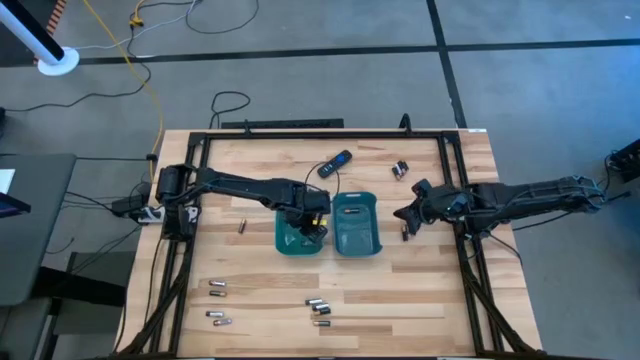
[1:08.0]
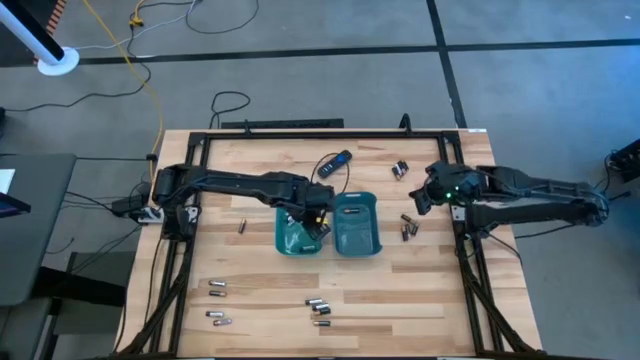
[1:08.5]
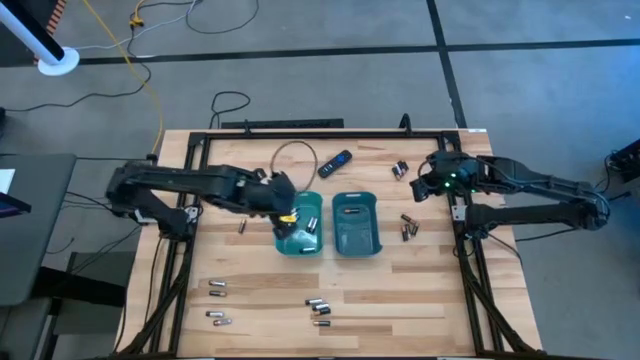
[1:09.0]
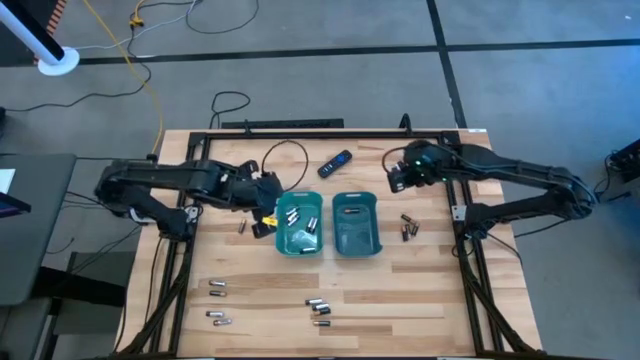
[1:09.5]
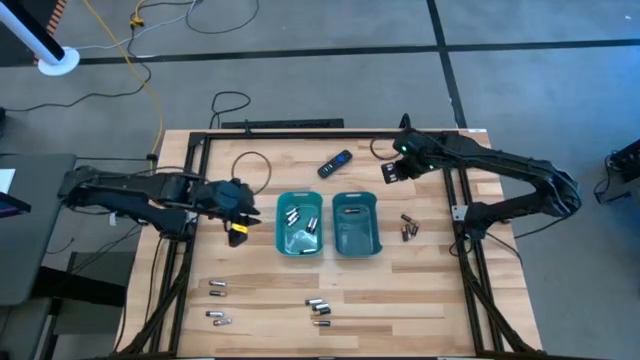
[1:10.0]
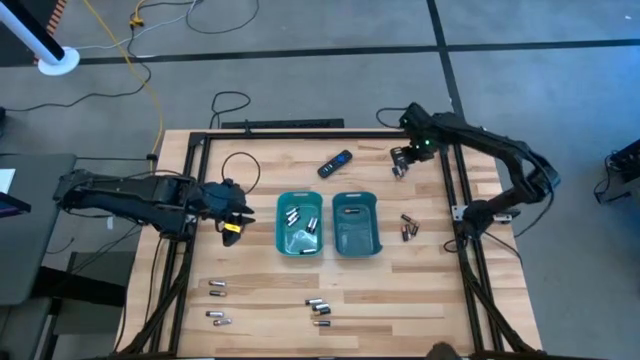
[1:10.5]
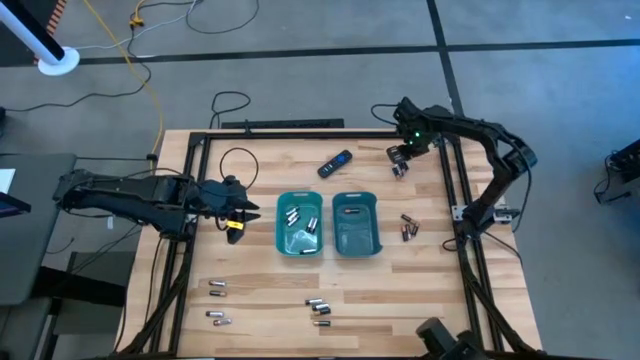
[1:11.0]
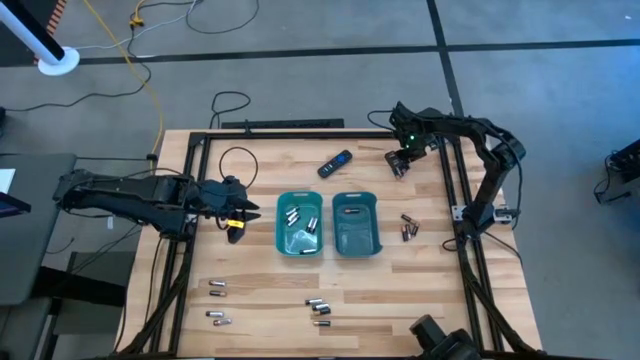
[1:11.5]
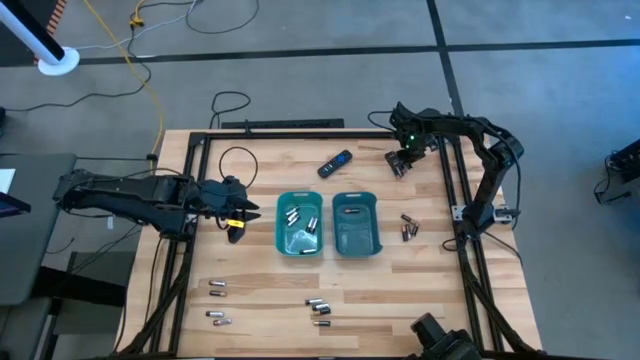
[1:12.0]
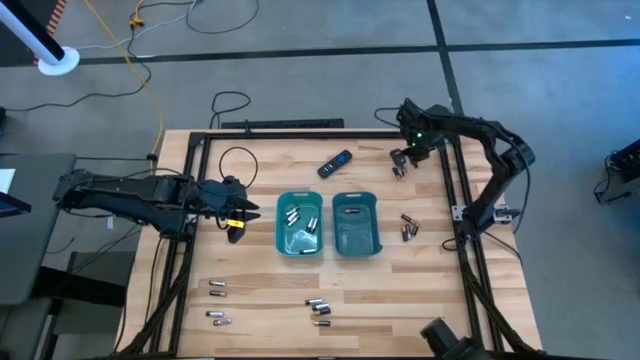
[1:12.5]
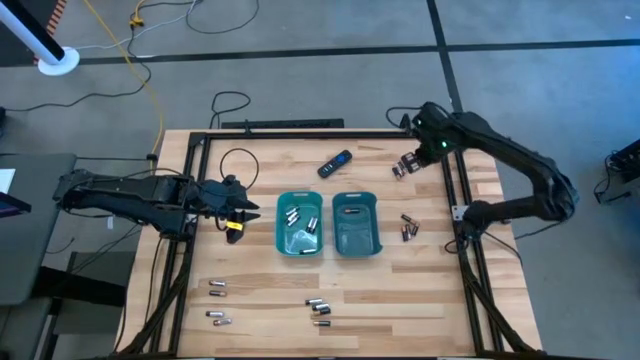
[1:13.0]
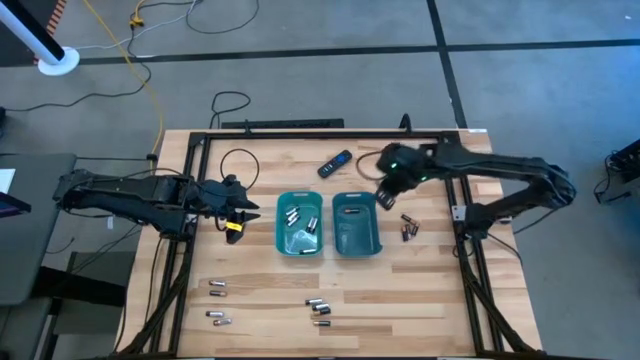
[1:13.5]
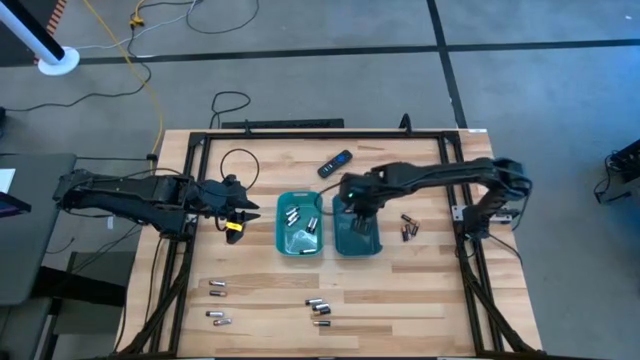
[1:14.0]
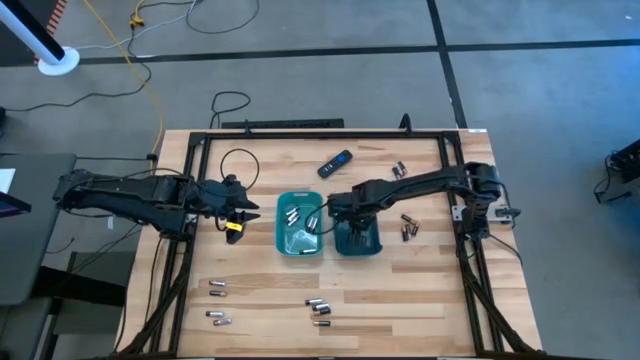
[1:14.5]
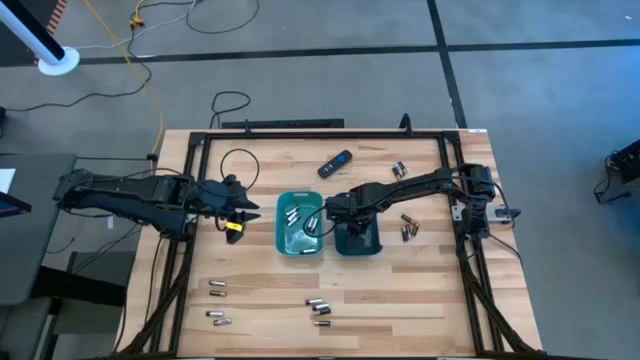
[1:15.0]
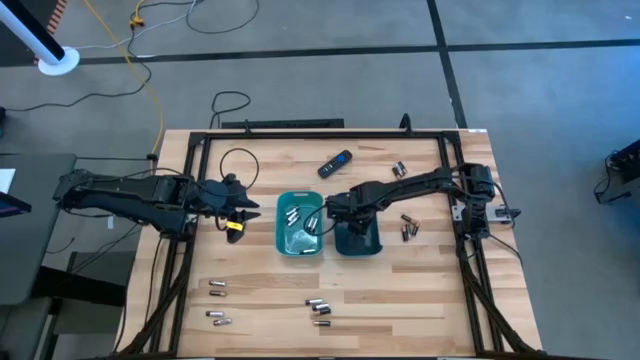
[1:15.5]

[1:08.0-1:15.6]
Task: Sort batteries
Put the copper and black battery into the blue bin

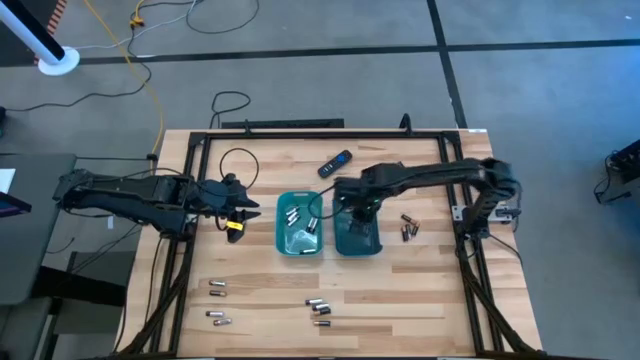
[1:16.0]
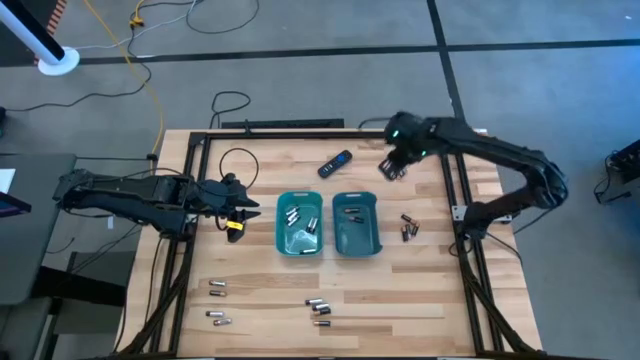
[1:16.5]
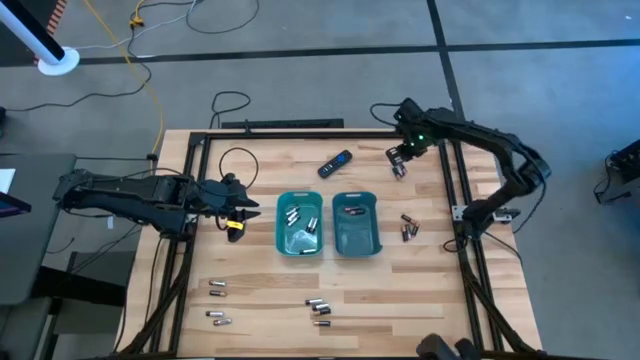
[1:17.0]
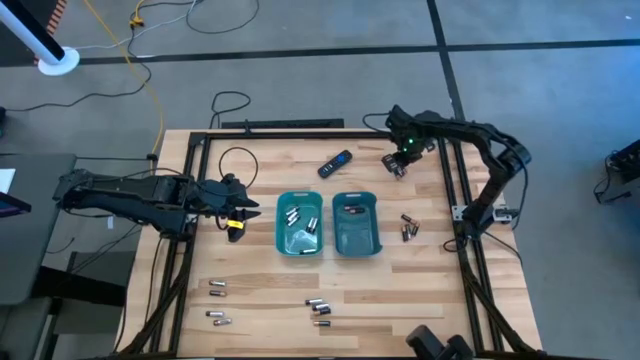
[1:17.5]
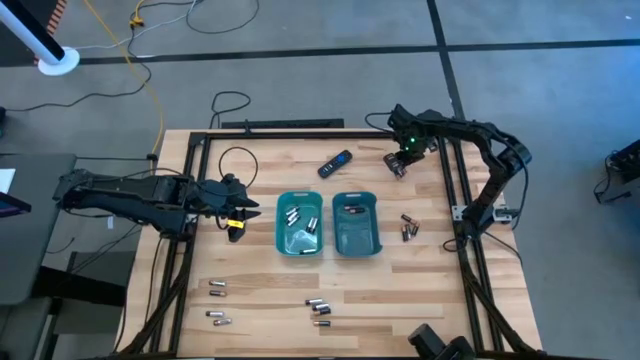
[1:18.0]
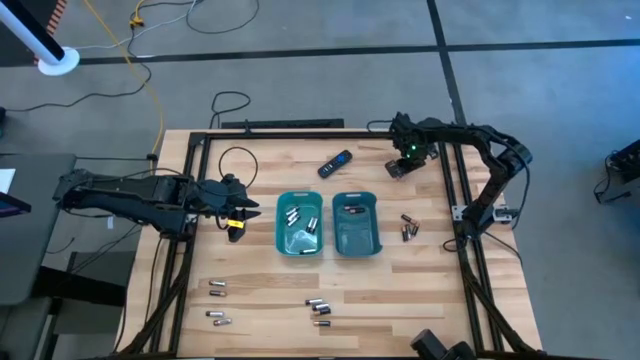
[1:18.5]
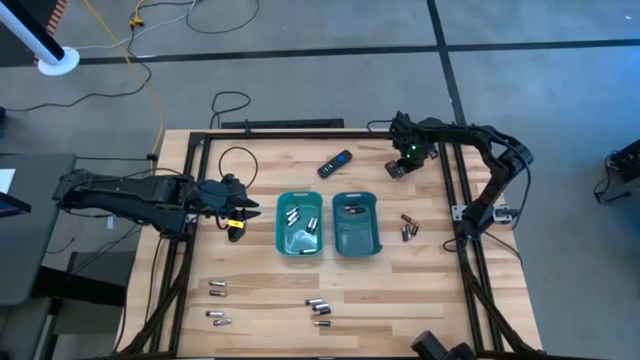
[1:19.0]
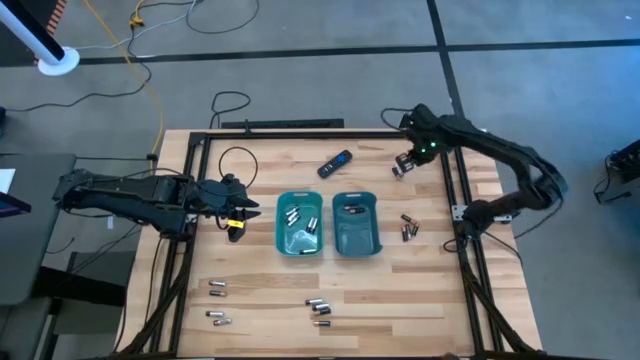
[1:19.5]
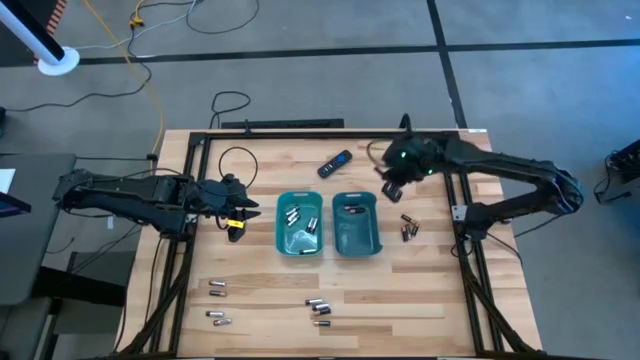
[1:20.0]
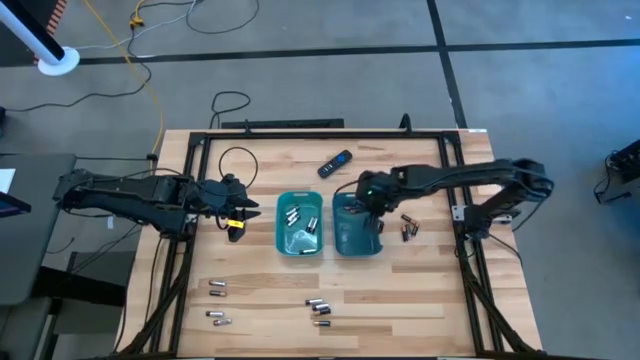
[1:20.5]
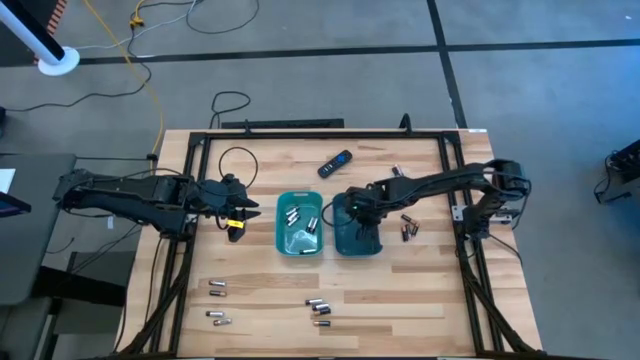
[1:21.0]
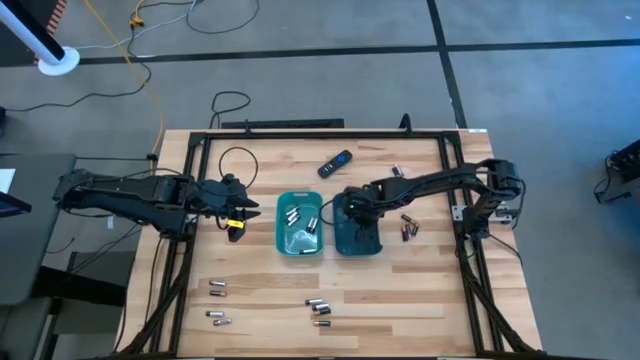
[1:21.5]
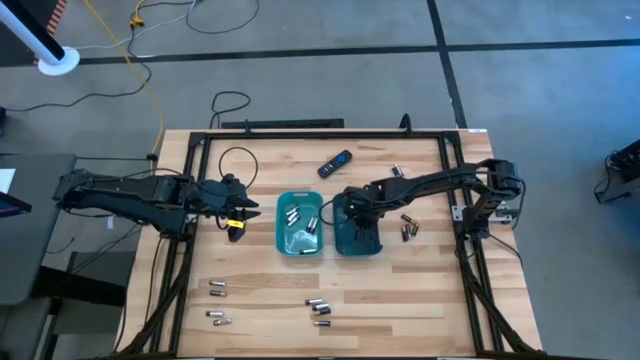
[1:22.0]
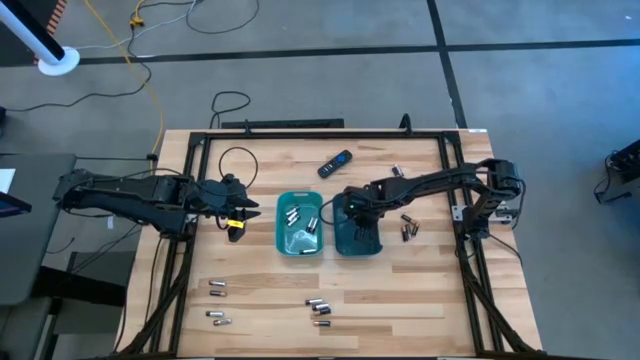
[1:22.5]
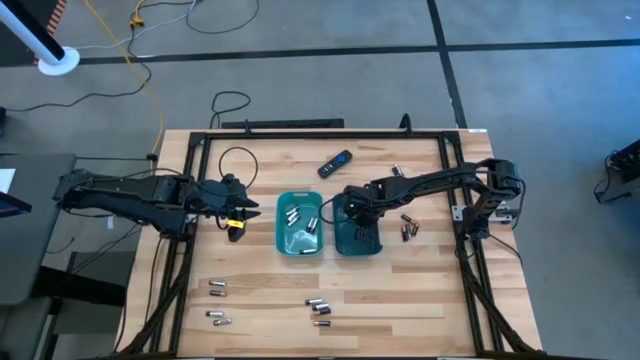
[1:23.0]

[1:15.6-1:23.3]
Put the copper and black battery into the blue bin

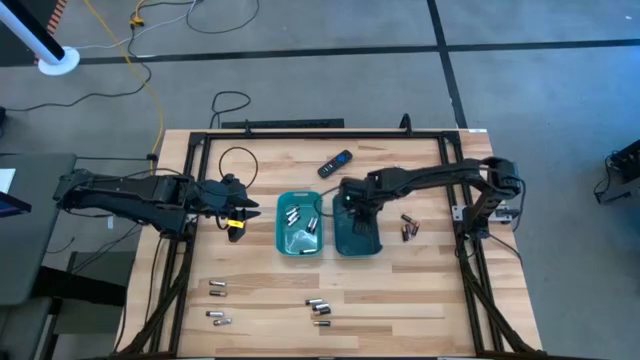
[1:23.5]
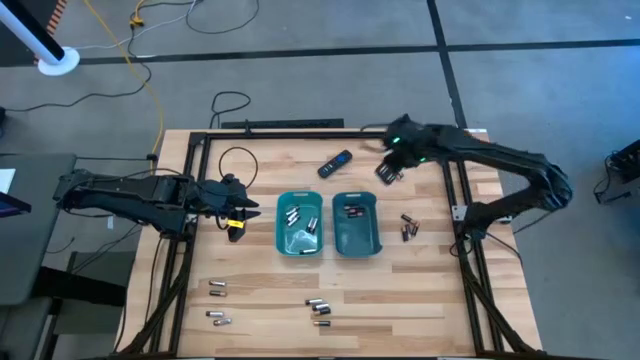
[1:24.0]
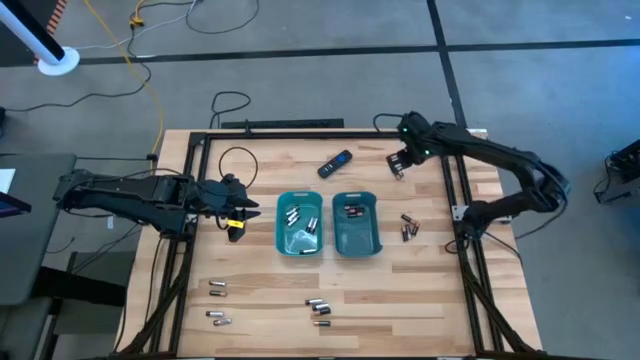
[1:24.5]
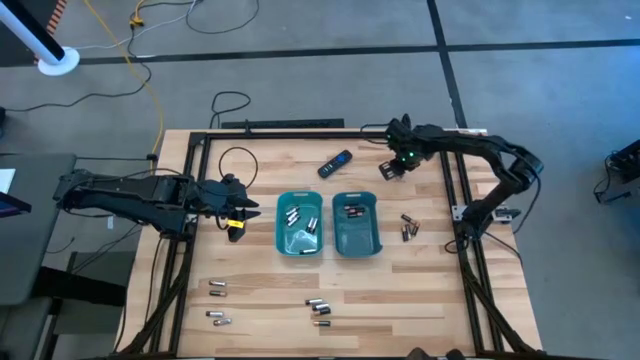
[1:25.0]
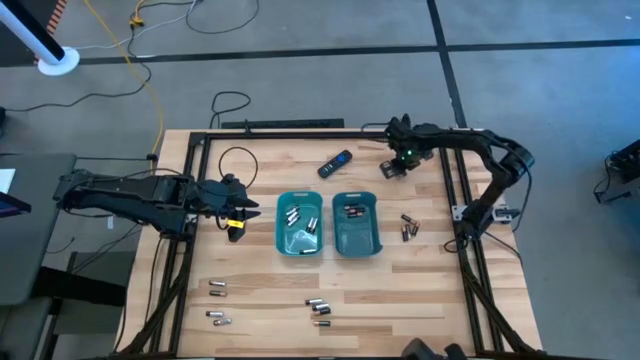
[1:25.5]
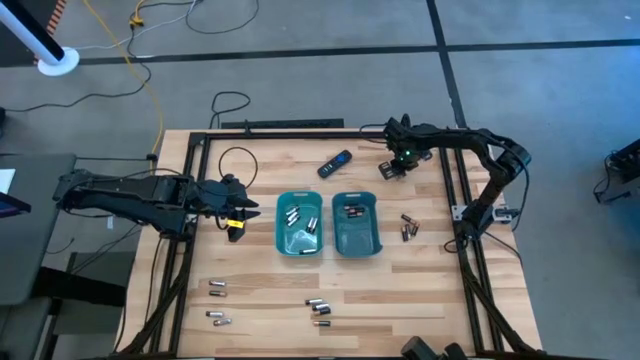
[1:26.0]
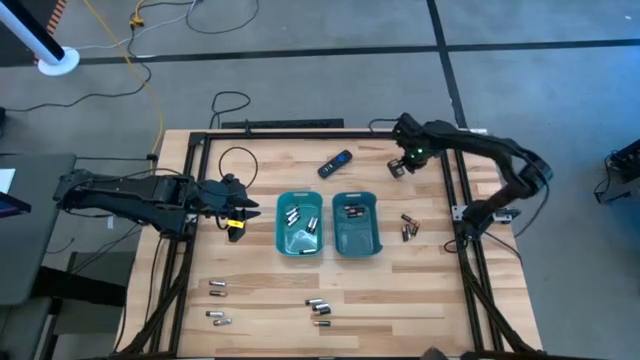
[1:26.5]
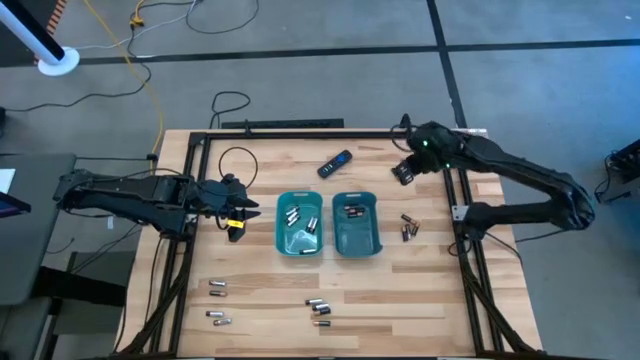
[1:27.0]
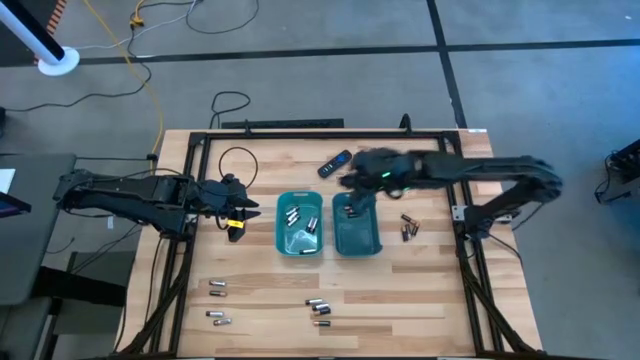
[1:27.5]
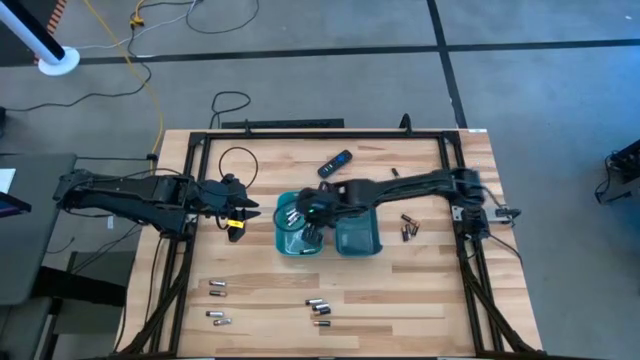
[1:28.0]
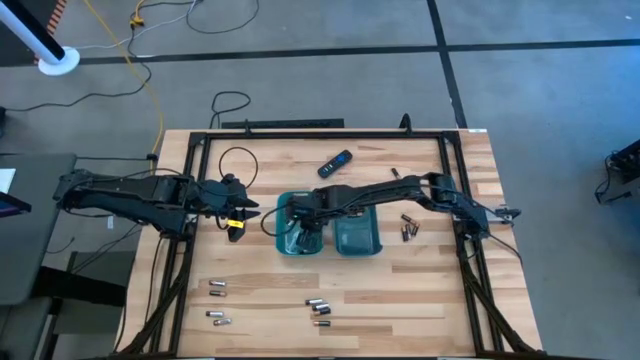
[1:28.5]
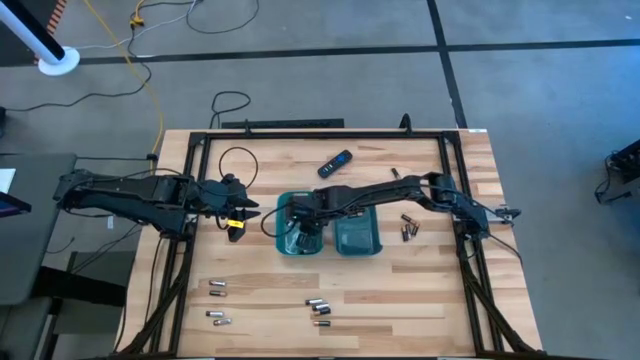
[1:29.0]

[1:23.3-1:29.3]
Put the silver and black battery into the green bin
